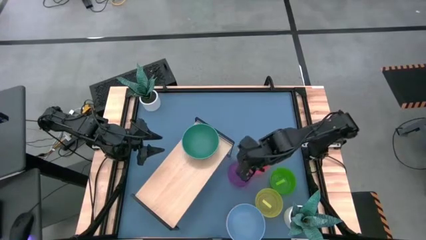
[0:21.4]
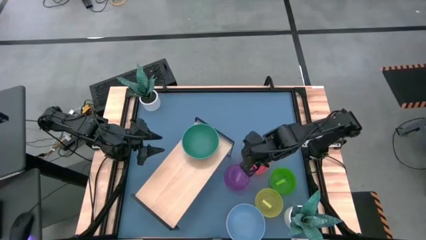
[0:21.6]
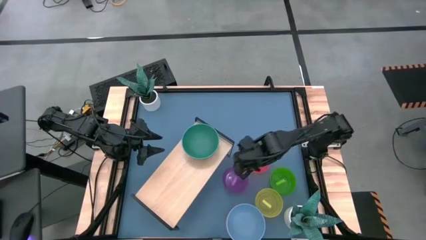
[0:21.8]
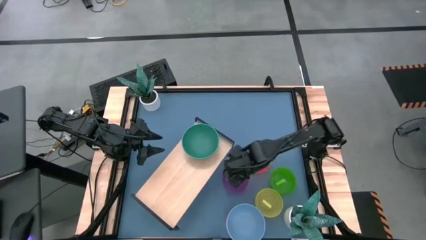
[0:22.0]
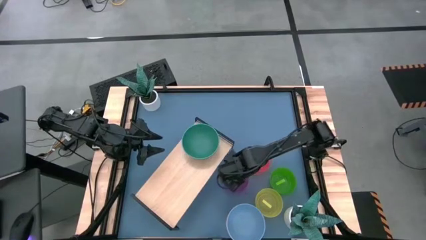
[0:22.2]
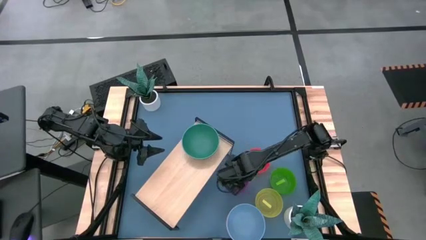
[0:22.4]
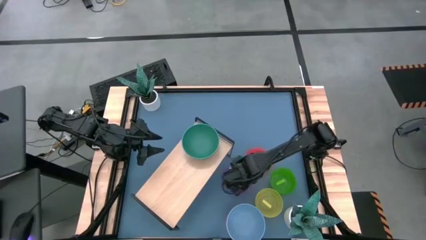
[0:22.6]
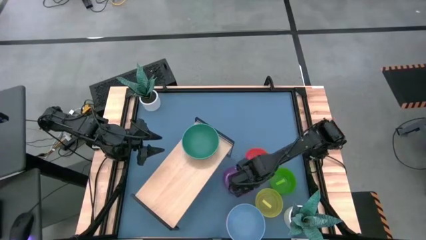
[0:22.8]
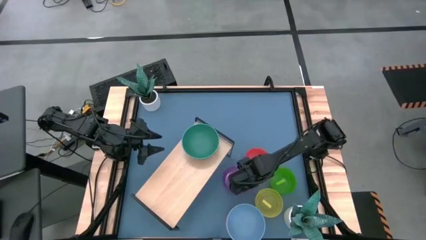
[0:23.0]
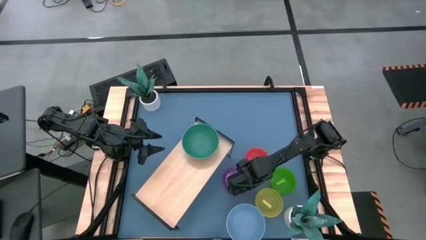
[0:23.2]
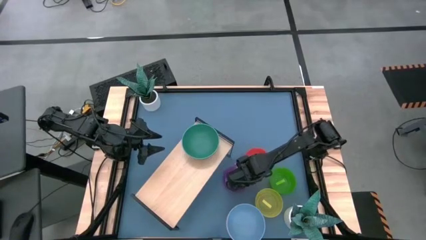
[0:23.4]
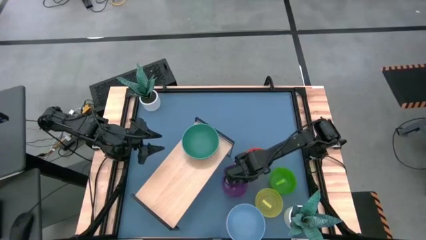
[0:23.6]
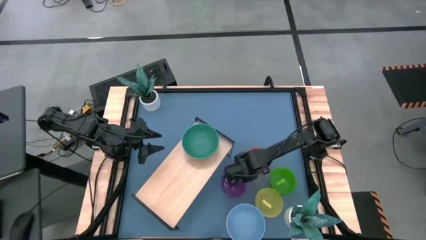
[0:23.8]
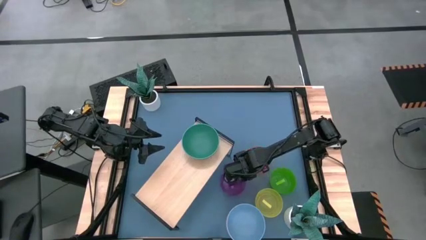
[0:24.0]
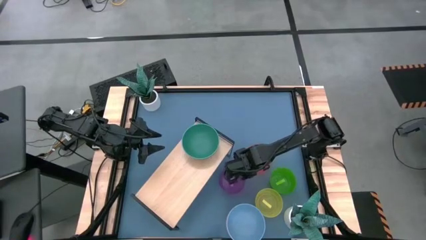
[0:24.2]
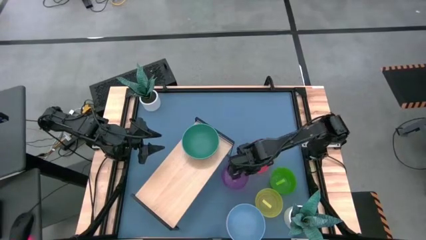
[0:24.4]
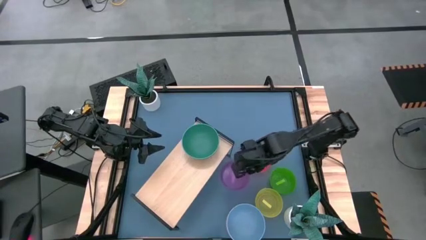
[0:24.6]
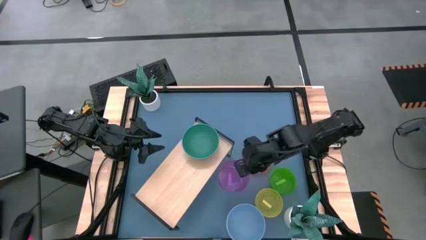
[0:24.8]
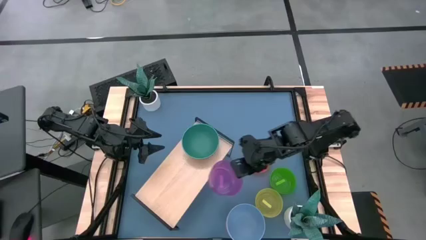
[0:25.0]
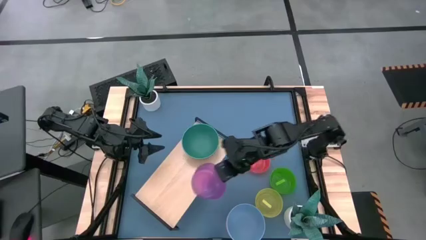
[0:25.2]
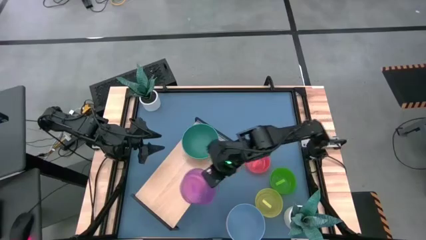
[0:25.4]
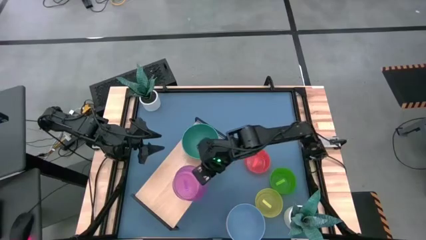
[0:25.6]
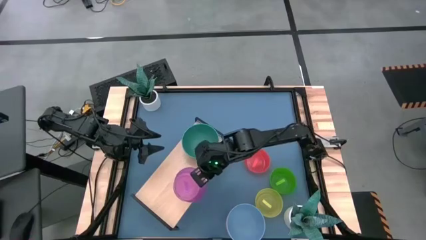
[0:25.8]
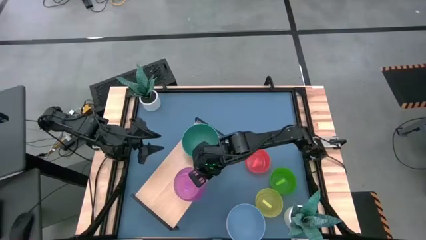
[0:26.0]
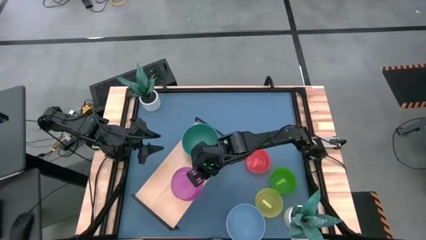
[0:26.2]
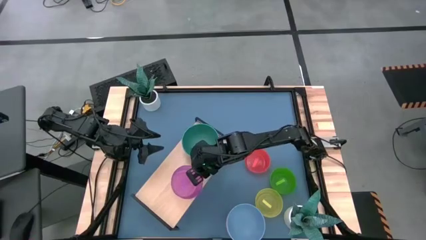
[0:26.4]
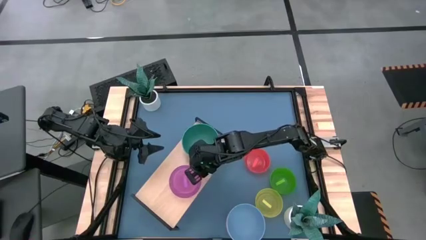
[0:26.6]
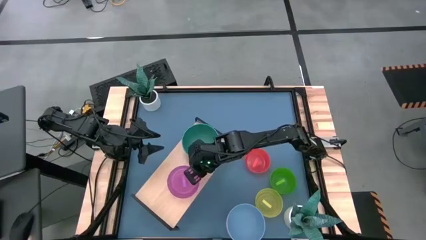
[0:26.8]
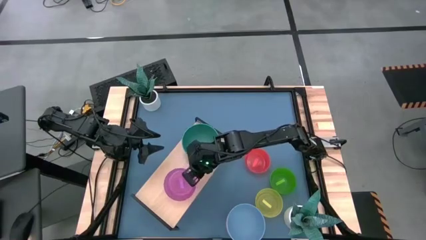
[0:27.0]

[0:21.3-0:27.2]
Task: Place and stack bowls onto a shelf
Put the light violet bowl on the shelf

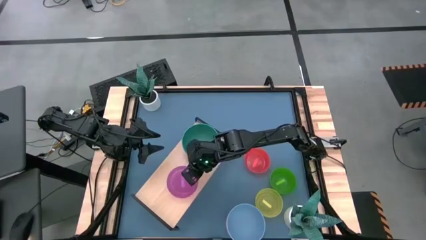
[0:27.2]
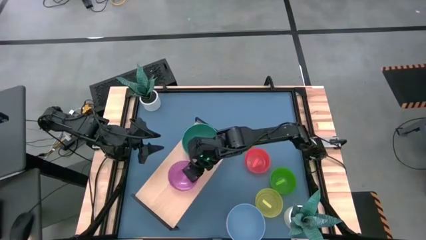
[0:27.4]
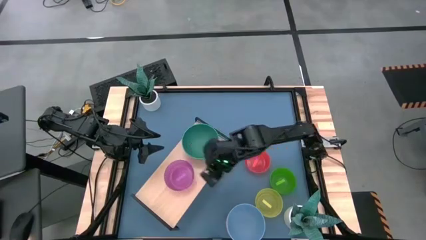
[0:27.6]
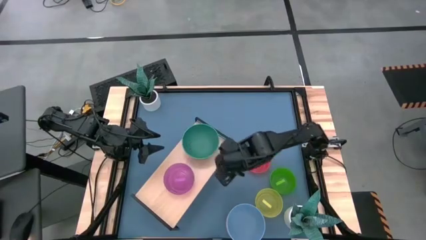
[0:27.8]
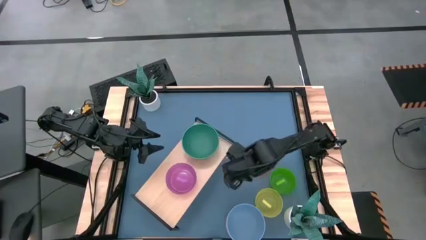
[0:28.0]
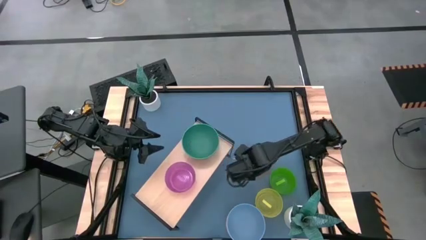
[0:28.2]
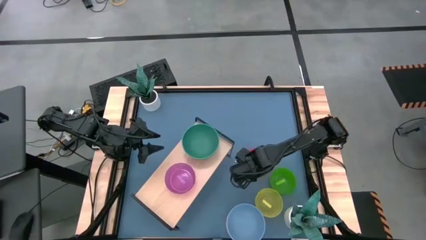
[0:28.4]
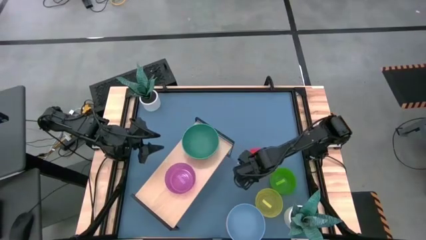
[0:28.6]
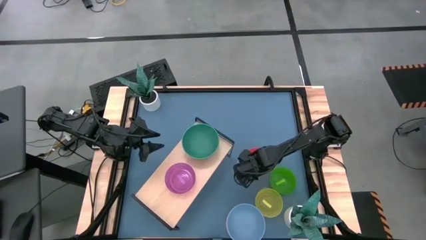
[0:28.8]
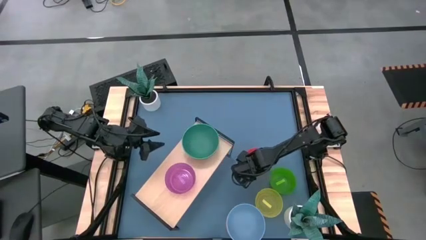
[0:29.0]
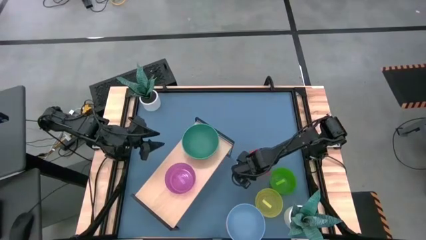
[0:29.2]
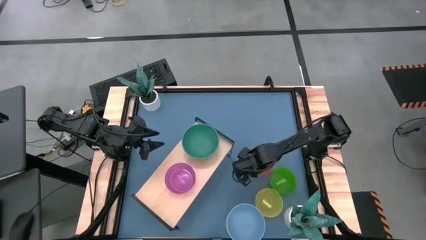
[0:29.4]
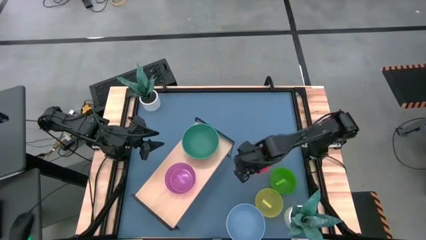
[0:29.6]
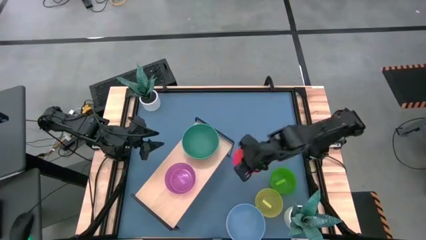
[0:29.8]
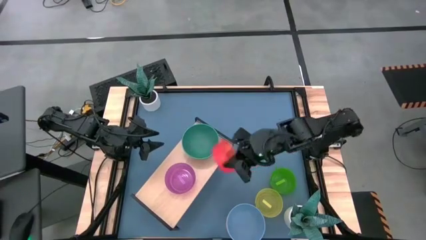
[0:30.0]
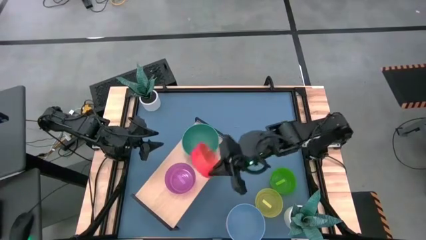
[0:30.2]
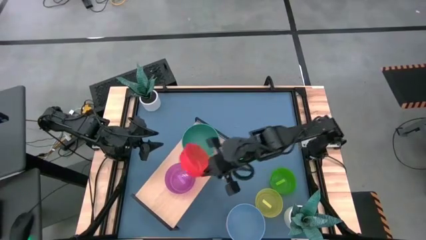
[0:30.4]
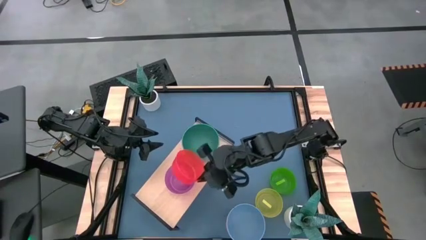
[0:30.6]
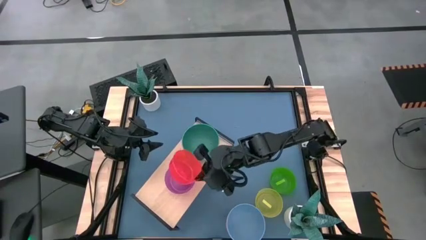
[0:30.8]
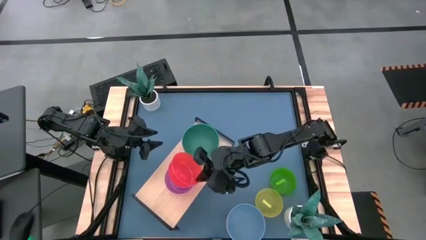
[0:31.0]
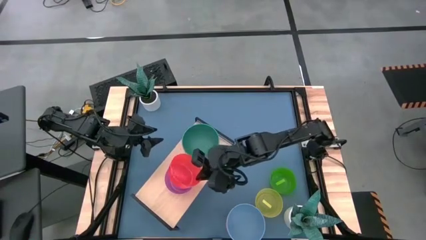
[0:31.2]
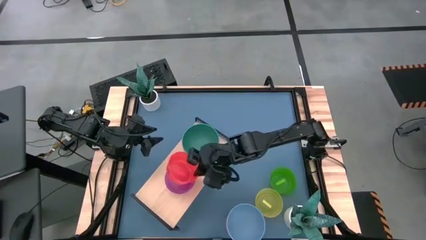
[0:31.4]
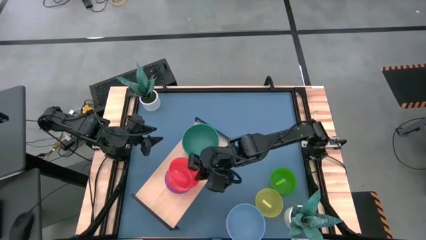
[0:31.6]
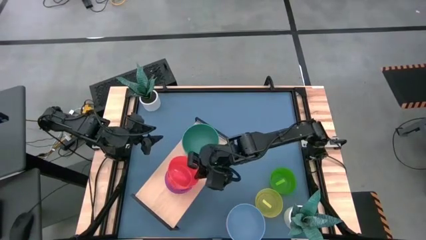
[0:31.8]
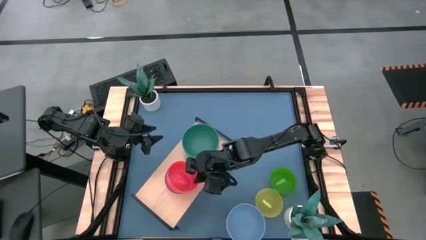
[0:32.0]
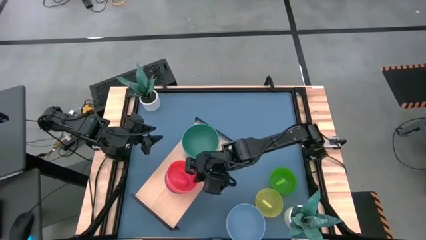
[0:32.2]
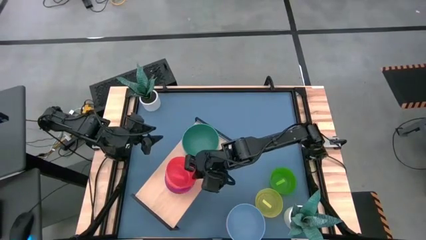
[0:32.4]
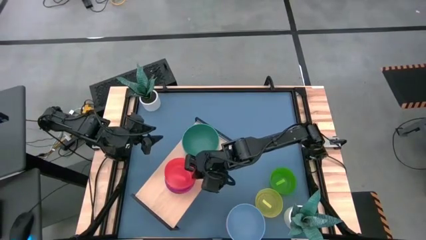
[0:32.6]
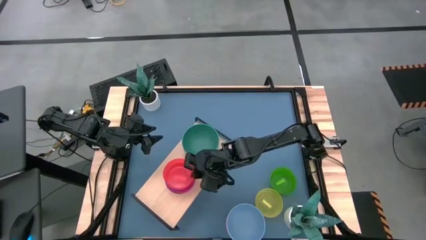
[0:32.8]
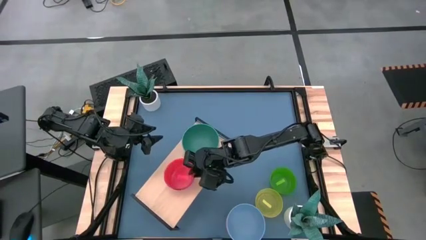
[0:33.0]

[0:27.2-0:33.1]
Stack the light orange bowl on top of the light violet bowl on the shelf

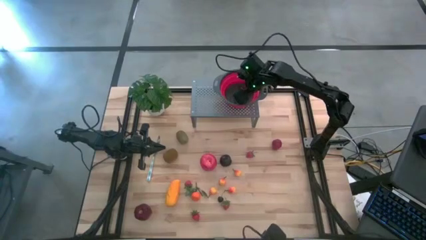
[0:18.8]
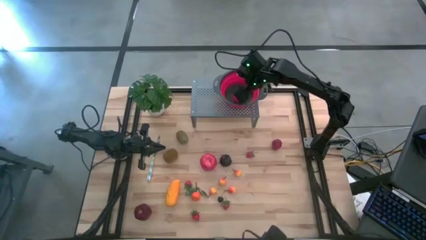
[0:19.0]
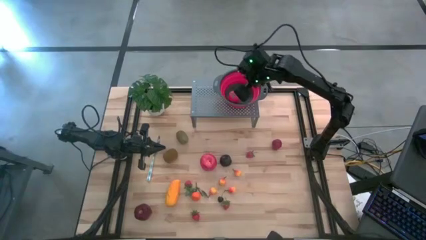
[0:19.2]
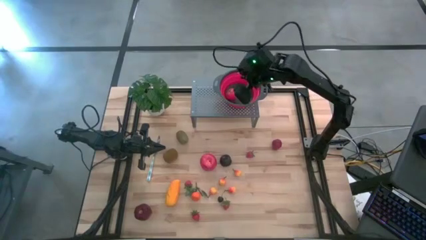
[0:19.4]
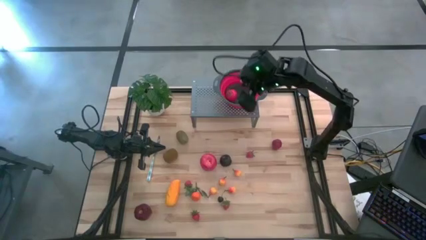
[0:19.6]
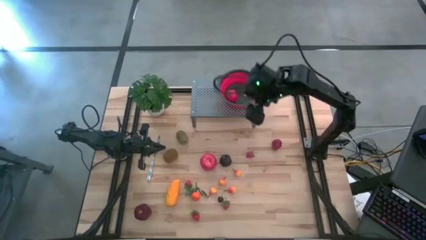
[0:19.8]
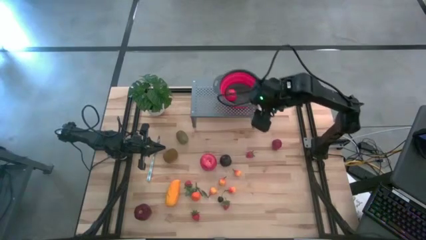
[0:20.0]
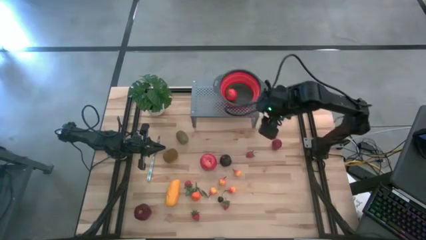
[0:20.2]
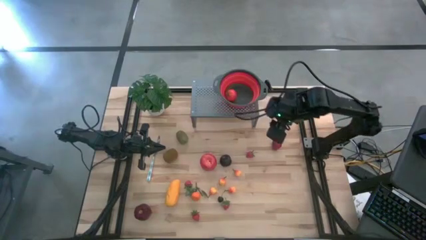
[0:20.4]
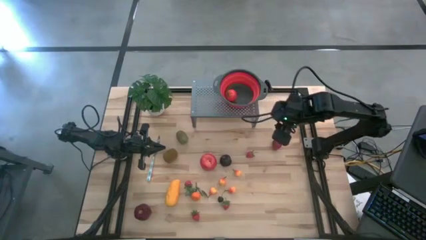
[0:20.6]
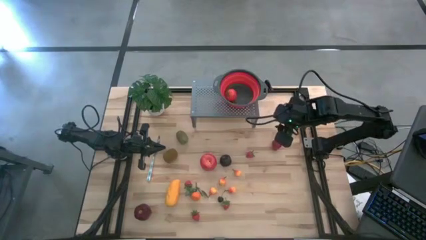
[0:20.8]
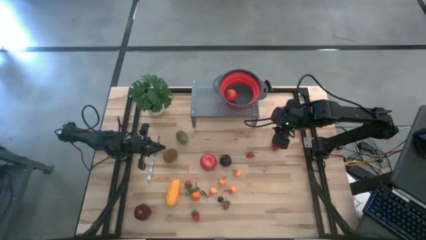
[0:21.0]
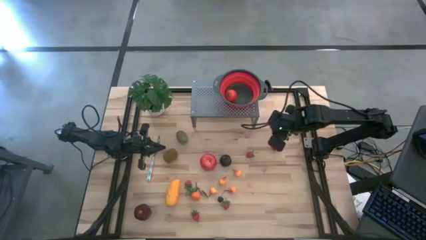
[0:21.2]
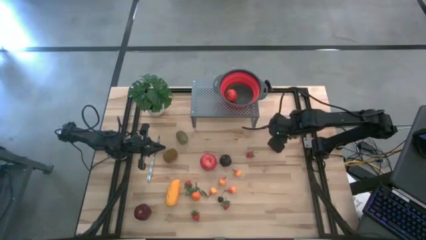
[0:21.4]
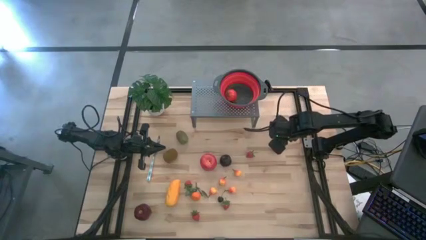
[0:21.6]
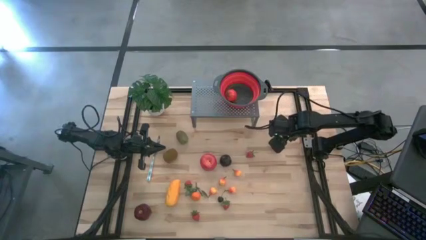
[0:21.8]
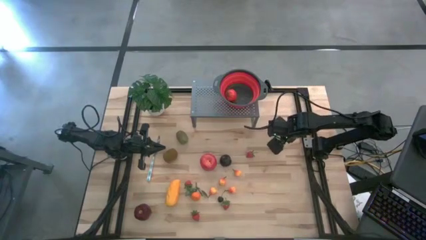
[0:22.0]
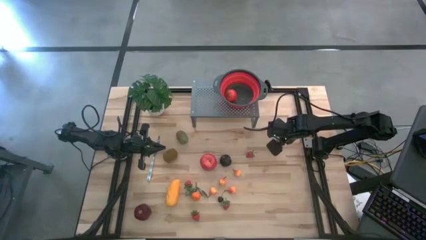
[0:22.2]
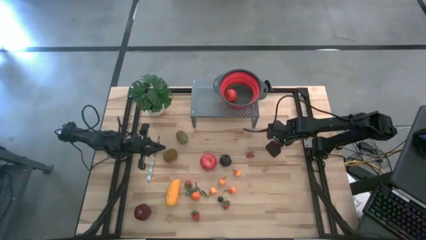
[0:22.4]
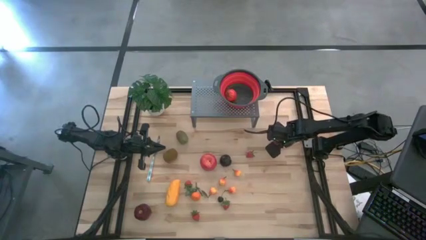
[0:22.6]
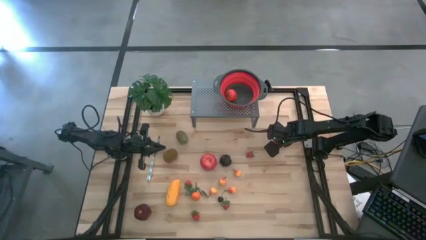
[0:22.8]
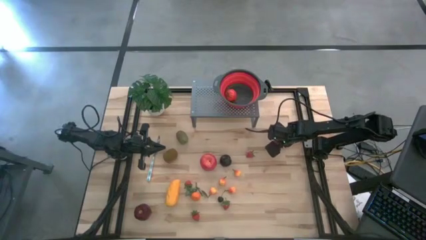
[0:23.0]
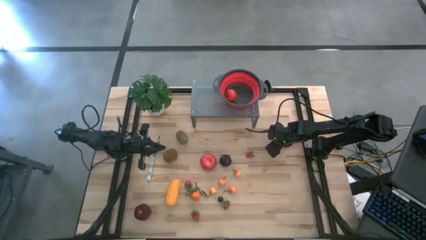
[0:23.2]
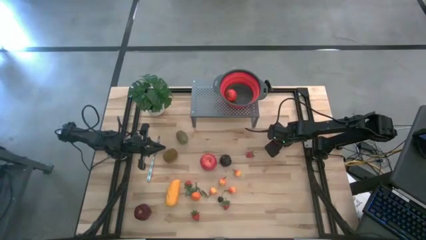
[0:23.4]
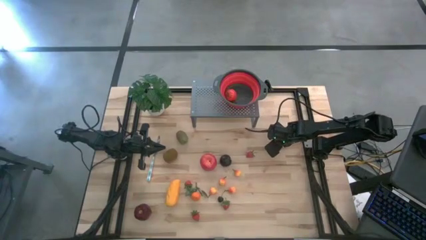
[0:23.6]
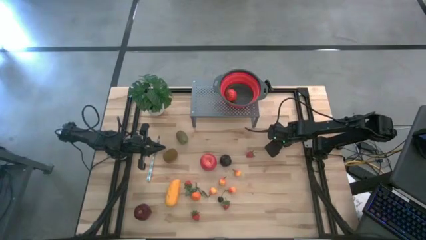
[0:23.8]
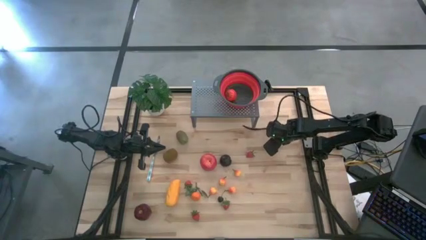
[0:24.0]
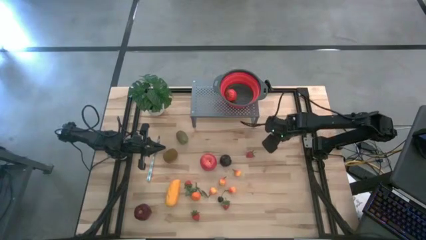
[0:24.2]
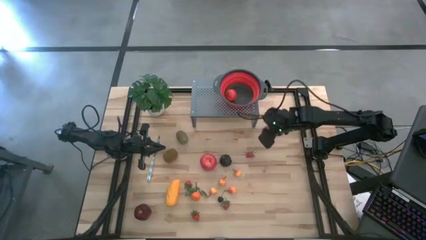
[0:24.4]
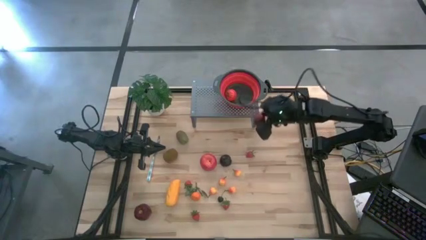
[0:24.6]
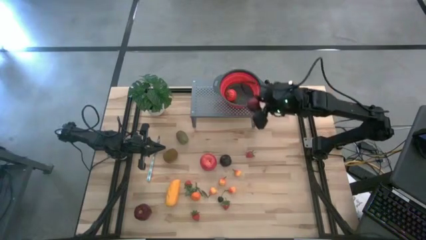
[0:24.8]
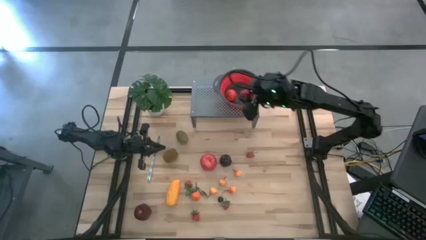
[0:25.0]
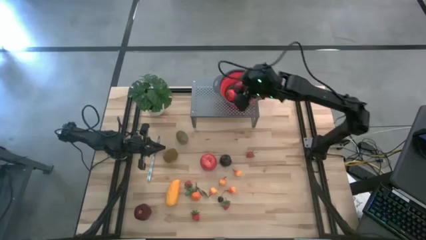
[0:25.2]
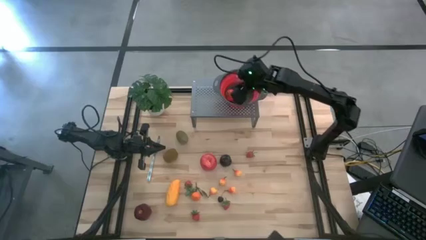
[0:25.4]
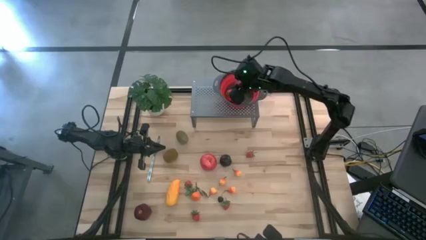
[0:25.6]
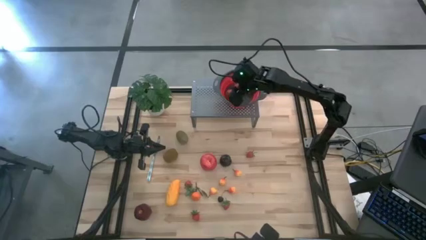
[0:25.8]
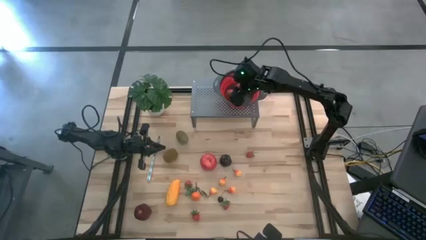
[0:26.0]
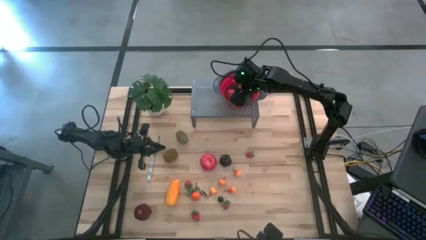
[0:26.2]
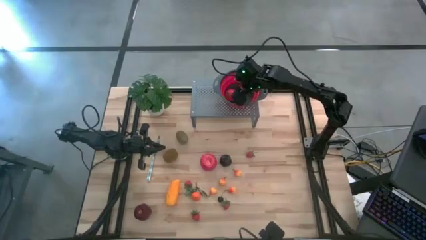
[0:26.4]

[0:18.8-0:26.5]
Task: Pick & Place Fruit
Put the pomegranate into the strainer bowl on the shelf
